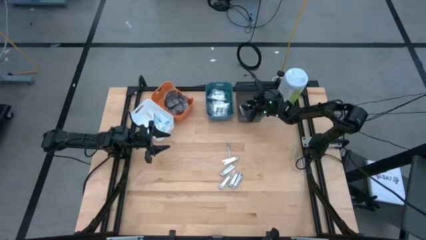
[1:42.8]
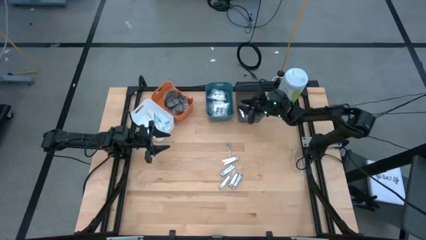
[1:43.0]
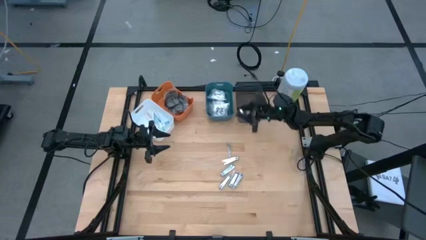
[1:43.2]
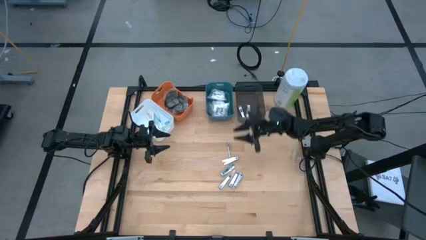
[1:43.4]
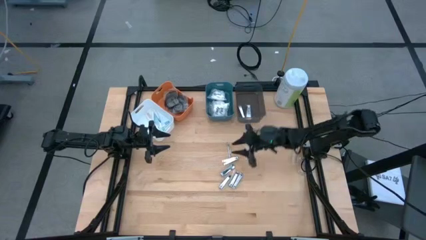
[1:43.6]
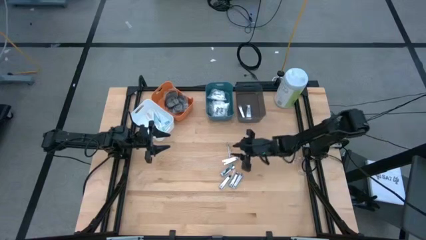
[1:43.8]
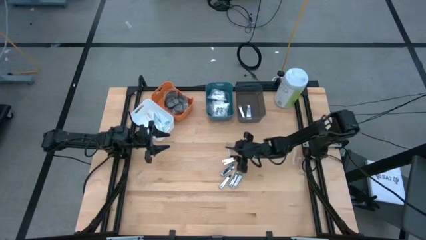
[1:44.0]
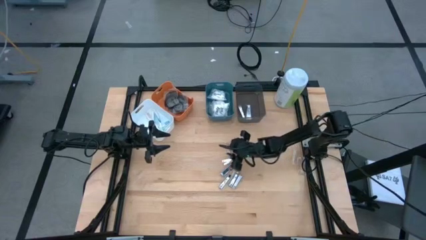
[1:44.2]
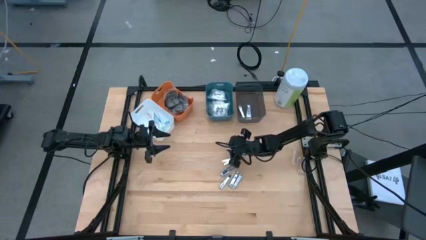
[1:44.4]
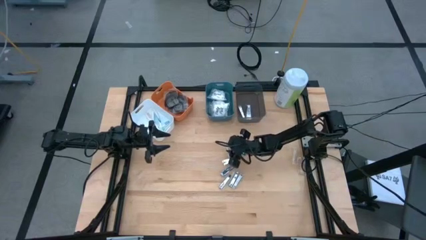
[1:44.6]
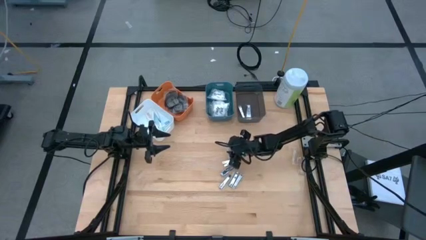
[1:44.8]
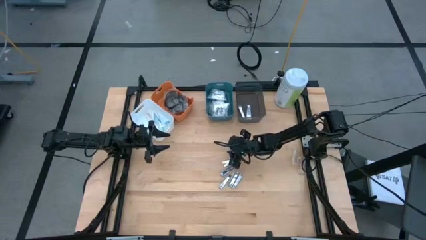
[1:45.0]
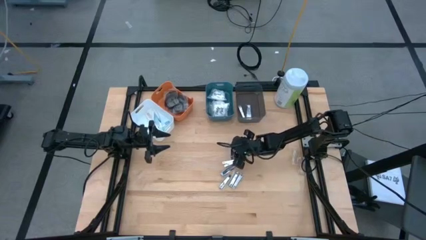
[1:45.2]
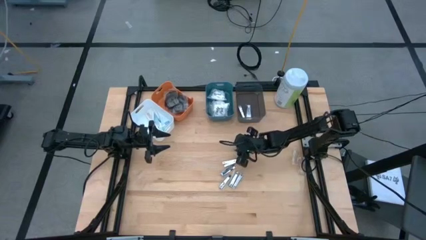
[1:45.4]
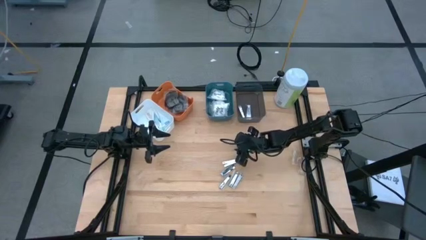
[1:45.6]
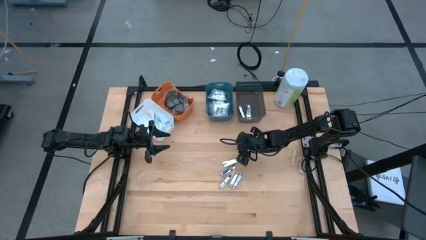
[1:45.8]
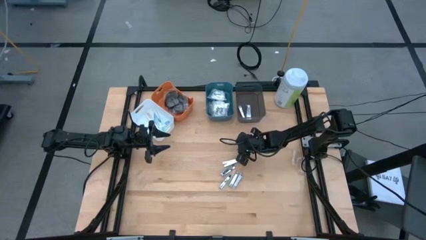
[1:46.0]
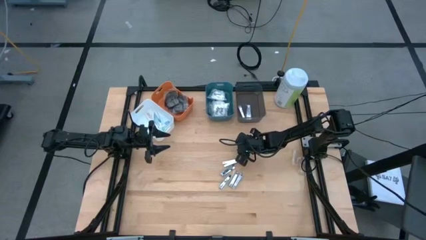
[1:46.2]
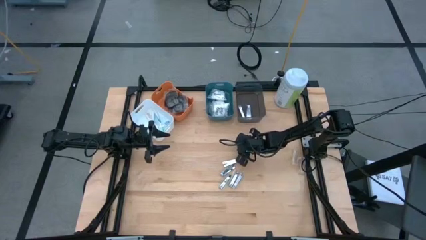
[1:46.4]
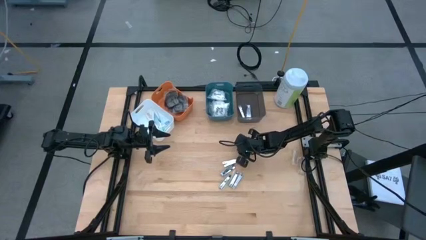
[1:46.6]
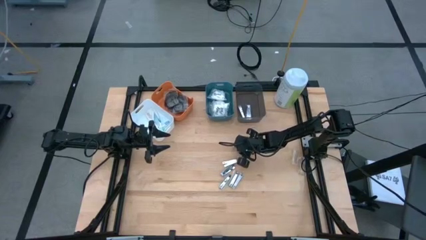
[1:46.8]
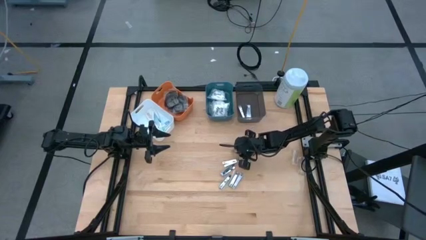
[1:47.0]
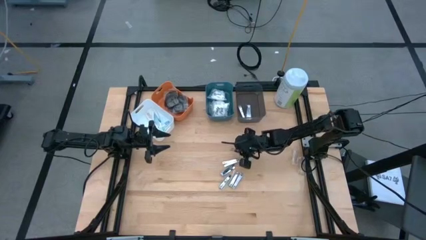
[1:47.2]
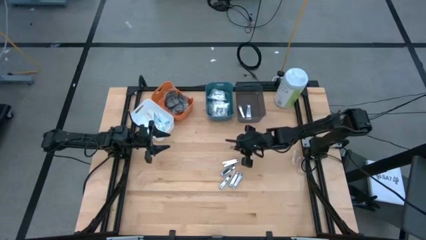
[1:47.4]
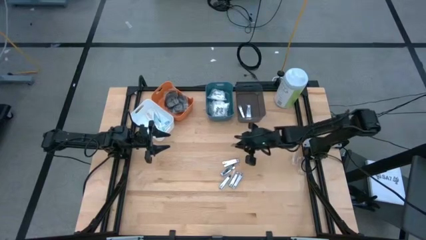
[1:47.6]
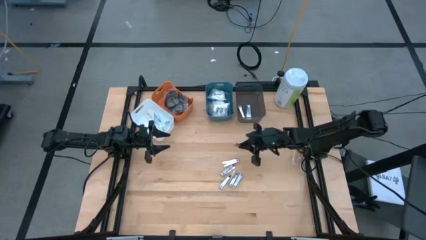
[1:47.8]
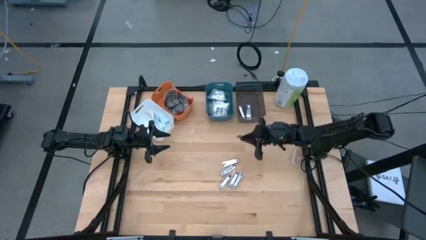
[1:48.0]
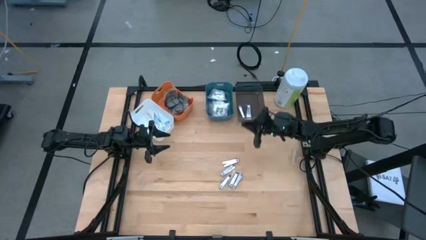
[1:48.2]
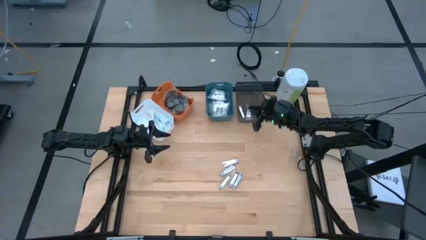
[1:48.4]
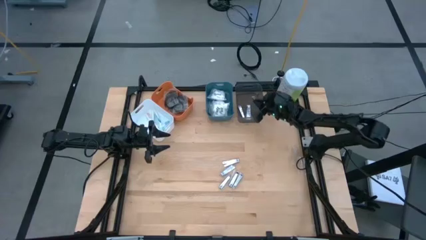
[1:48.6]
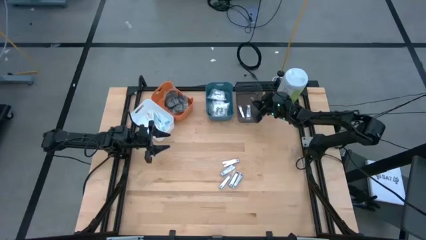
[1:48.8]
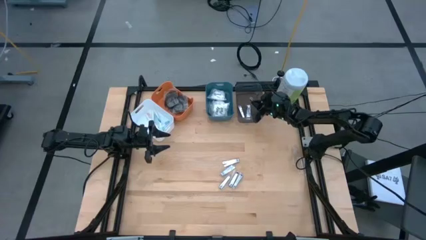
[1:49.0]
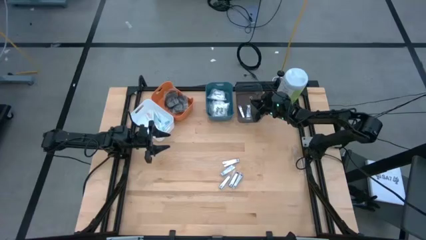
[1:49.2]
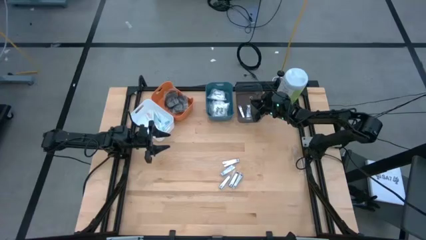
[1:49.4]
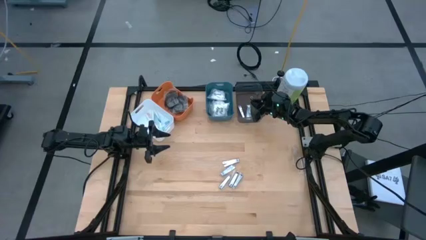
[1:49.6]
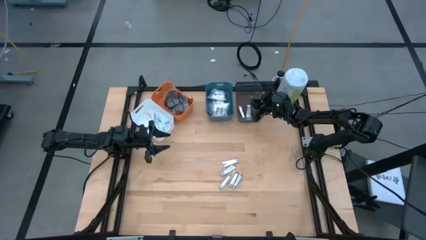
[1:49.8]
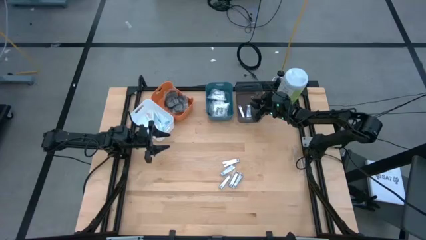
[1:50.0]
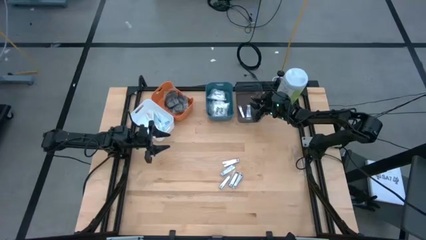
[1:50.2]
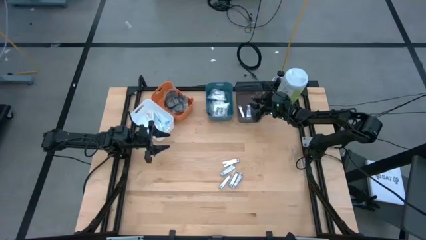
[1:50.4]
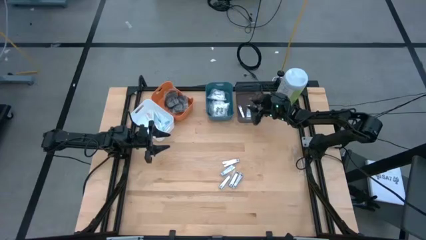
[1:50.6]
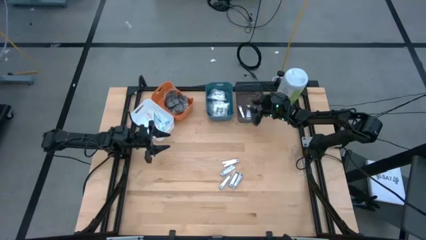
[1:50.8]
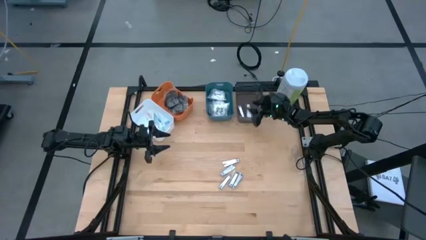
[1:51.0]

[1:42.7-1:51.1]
Task: Pick & Place Travel size toiletries
Put the silver nail cutter into the black bin

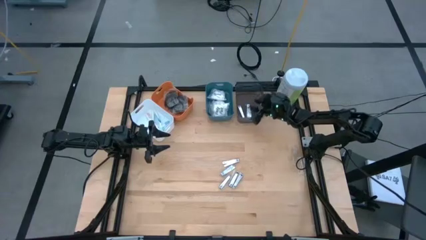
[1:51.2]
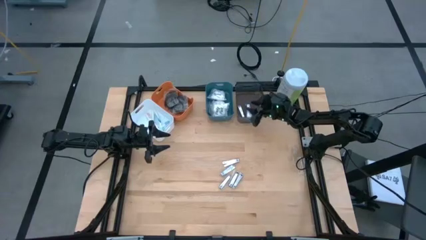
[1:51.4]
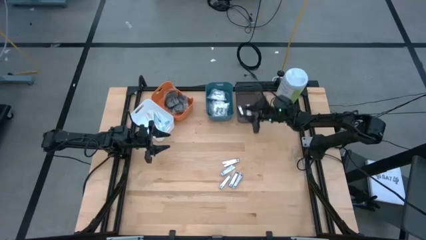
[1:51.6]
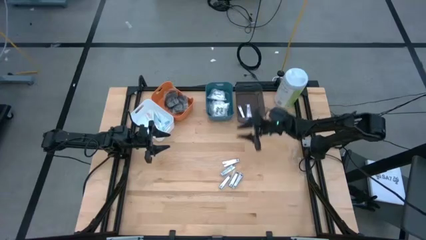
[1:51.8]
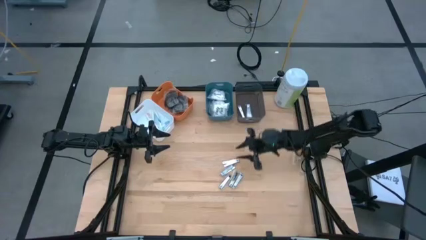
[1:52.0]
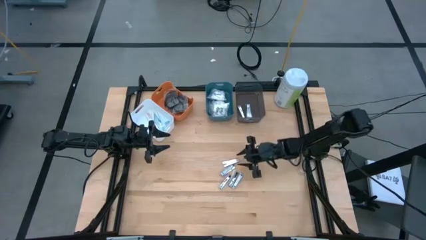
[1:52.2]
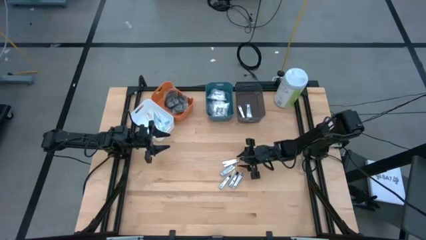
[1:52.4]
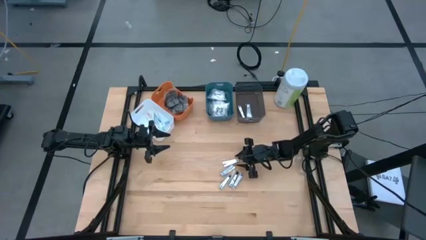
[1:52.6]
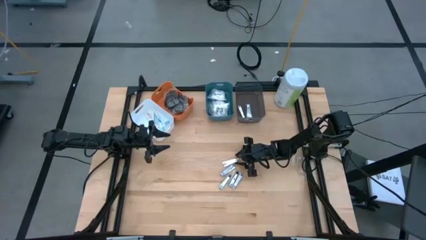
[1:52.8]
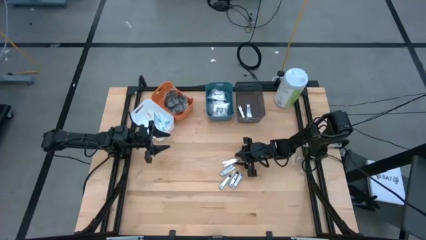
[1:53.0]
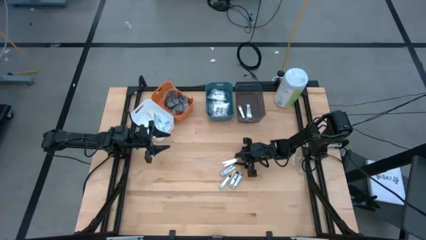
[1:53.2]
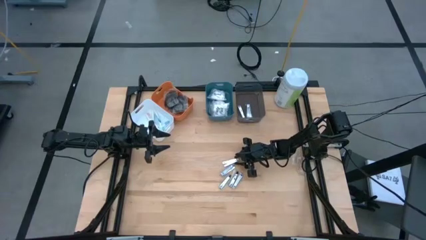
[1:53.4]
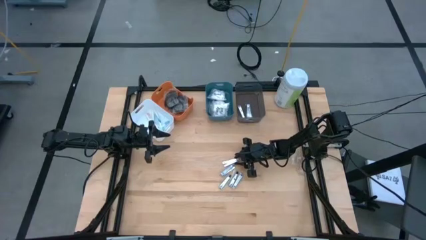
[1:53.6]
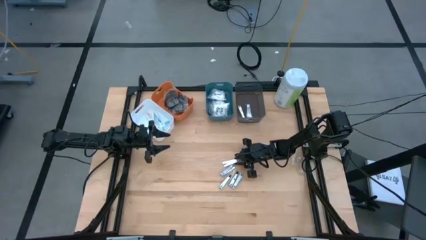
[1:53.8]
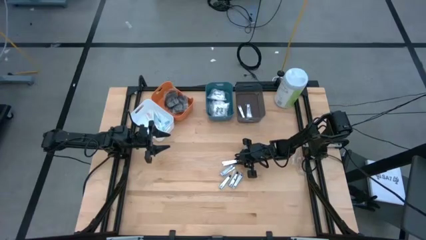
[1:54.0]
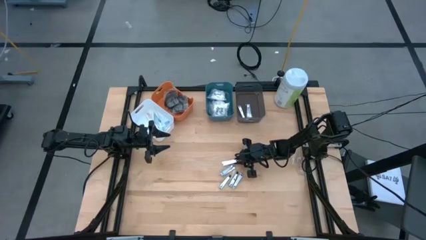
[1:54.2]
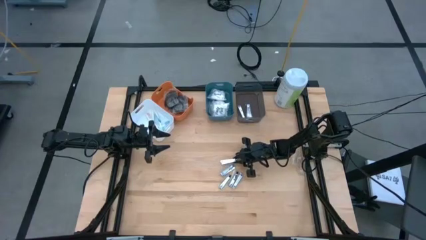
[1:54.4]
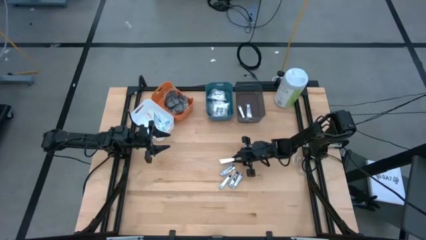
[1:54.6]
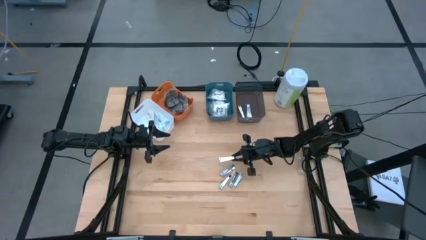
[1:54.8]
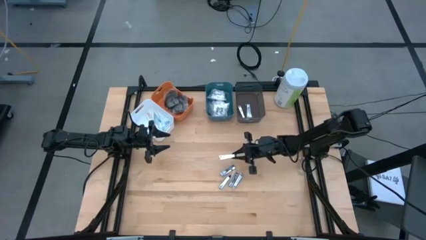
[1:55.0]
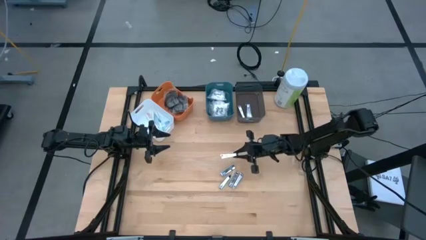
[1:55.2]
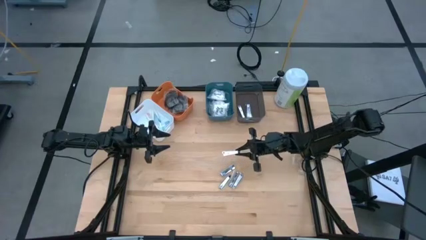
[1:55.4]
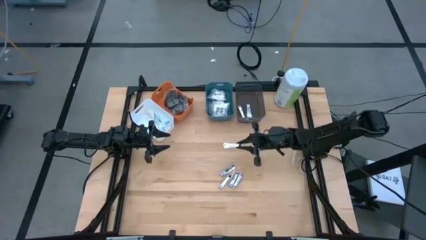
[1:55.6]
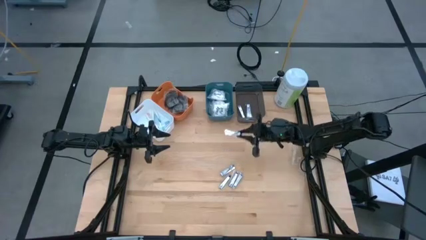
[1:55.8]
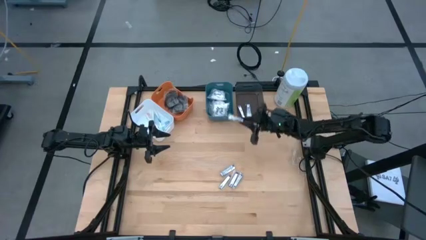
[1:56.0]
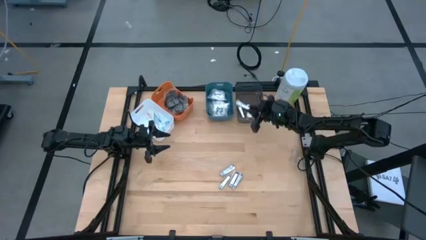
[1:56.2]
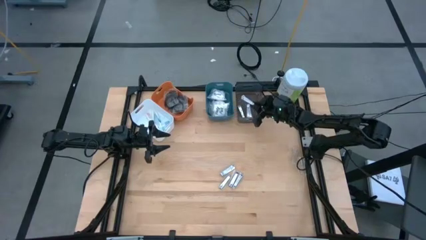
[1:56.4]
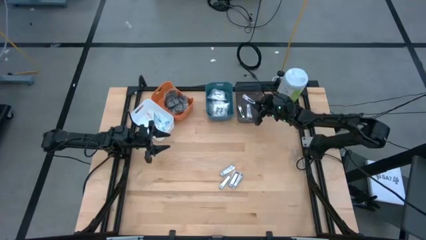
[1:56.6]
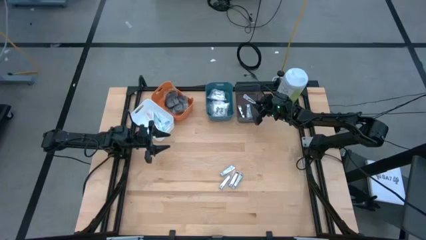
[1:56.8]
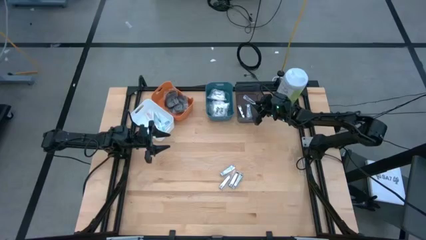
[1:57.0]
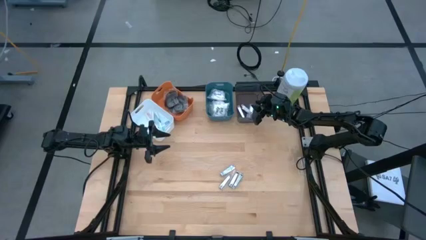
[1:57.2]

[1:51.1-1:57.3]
Put the silver nail cutter into the black bin

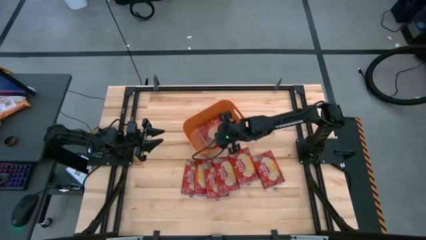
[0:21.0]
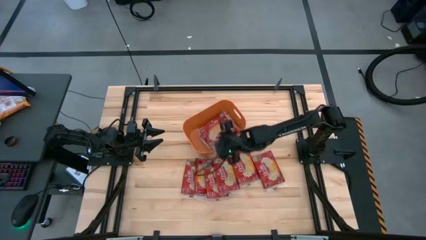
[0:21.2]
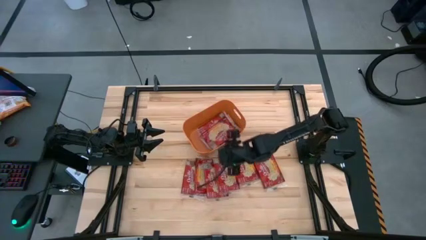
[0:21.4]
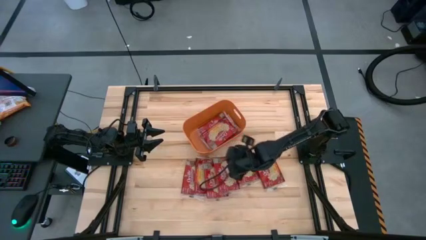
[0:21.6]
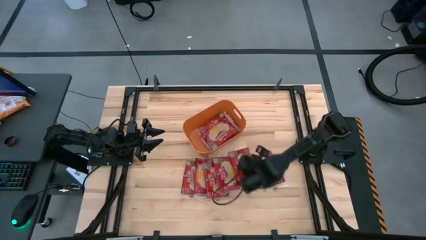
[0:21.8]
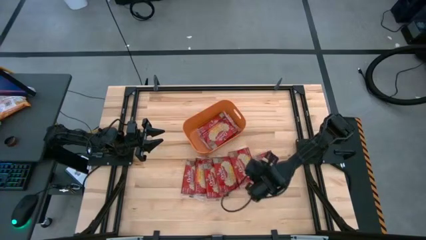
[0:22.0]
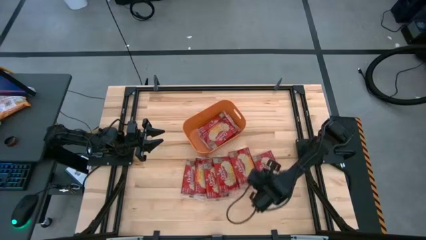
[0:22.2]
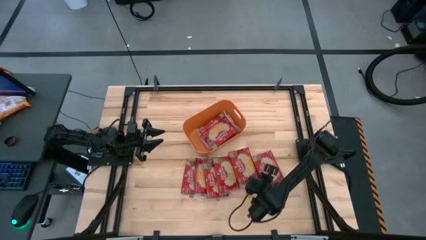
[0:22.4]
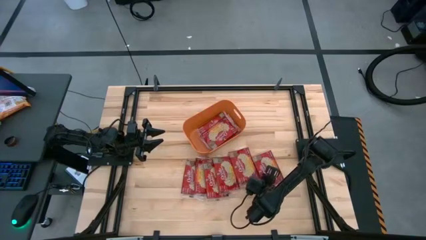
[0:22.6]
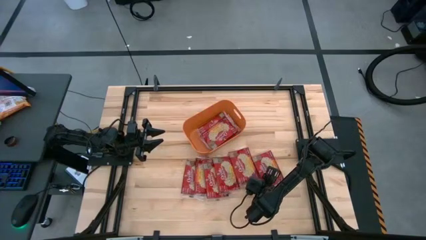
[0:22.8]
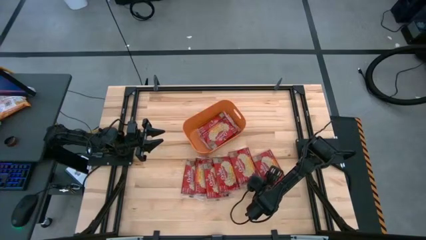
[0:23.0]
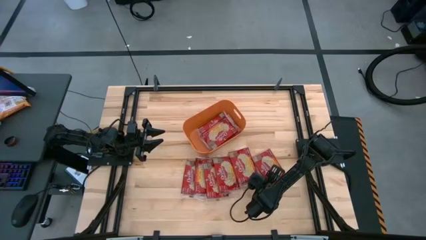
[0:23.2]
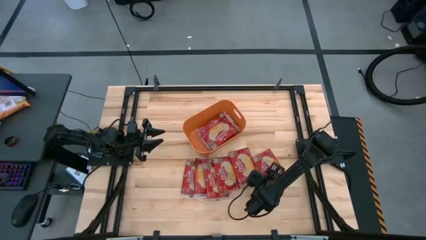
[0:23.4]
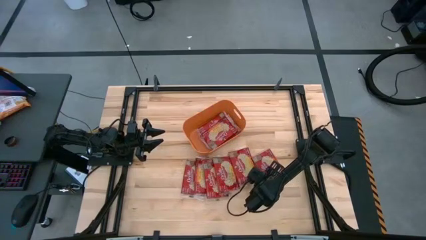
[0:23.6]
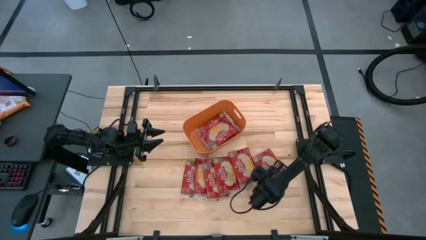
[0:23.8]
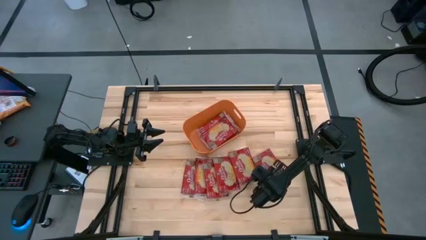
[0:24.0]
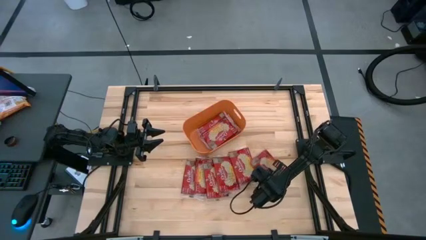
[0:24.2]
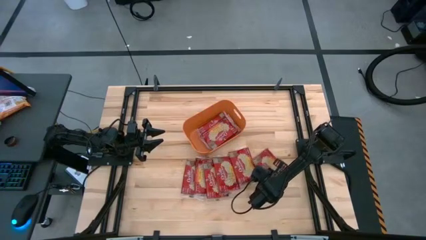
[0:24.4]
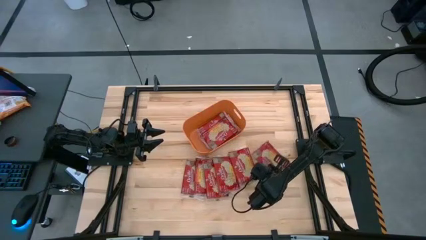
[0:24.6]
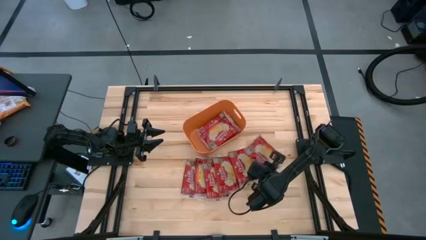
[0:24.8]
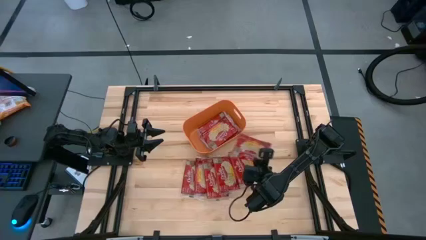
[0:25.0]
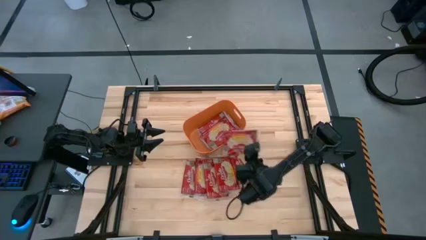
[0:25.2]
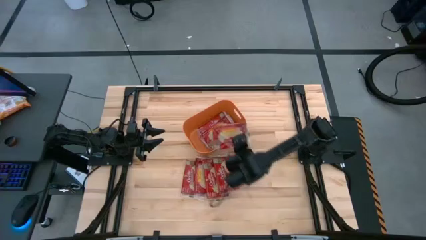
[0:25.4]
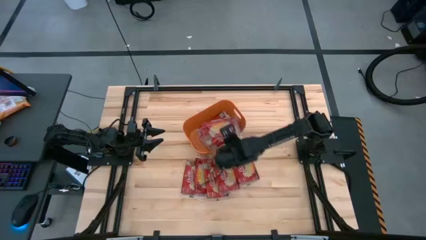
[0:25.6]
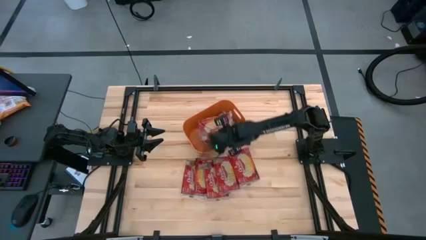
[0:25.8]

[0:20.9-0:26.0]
Task: Sort popcorn bags into baskets
Put the pop corn bag into the orange bin
